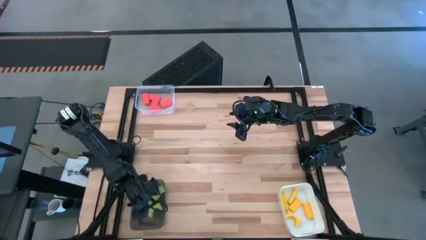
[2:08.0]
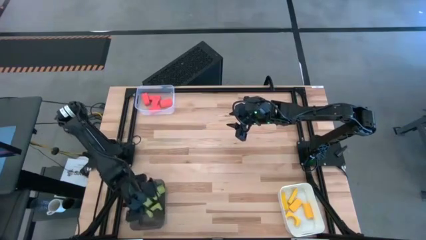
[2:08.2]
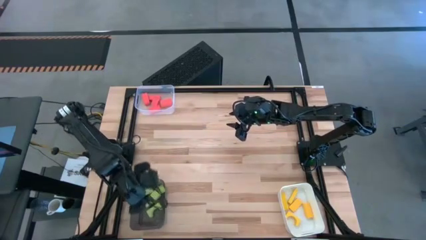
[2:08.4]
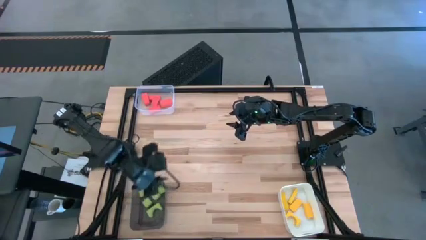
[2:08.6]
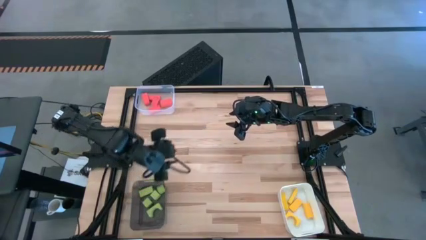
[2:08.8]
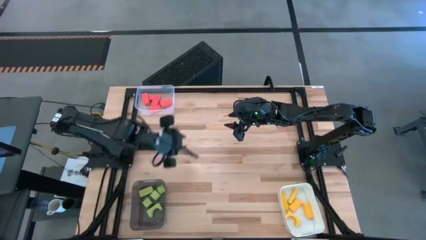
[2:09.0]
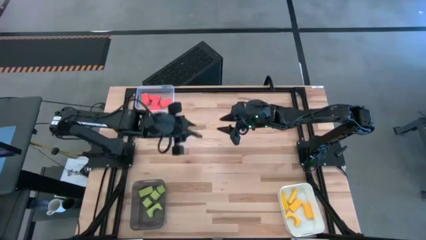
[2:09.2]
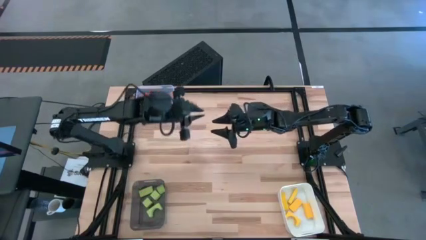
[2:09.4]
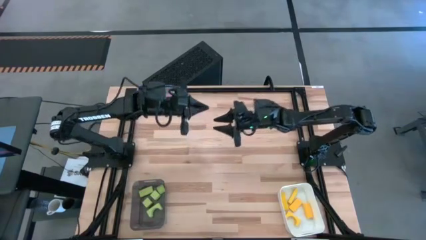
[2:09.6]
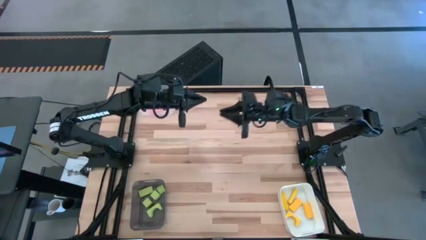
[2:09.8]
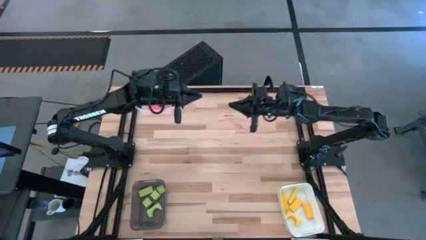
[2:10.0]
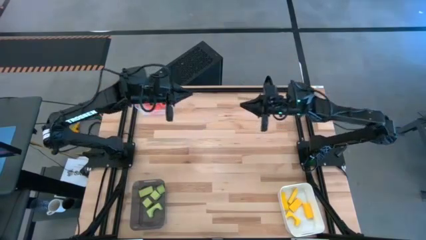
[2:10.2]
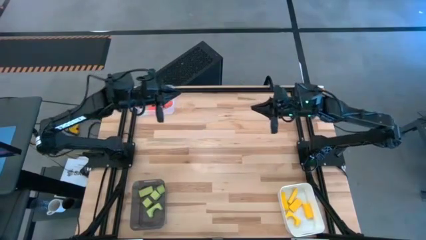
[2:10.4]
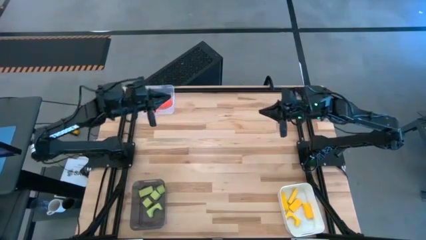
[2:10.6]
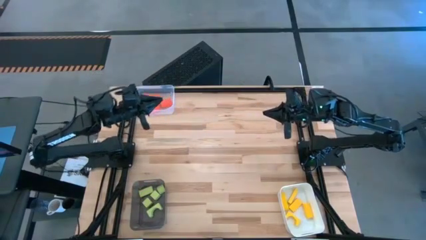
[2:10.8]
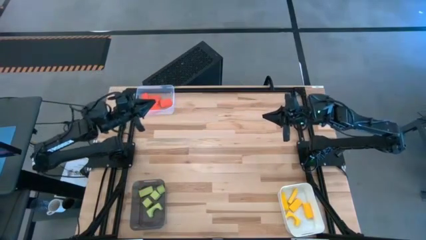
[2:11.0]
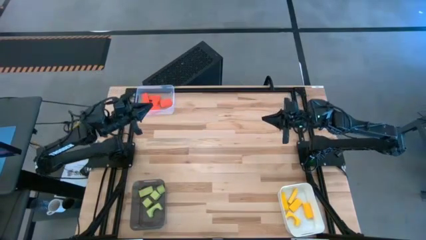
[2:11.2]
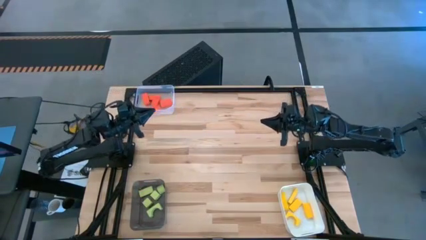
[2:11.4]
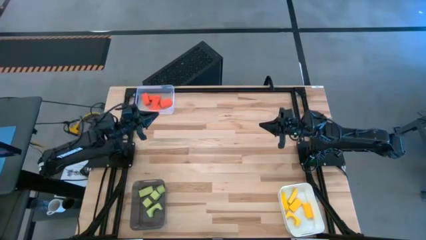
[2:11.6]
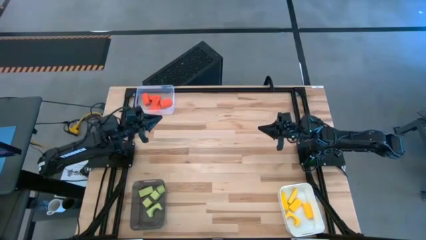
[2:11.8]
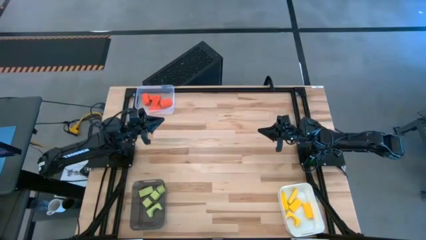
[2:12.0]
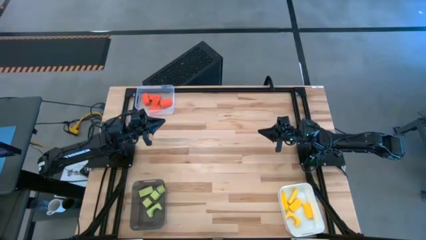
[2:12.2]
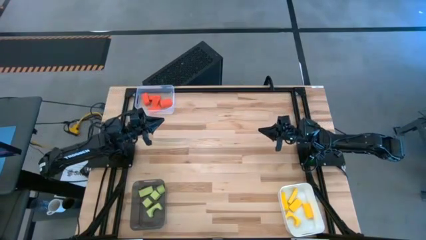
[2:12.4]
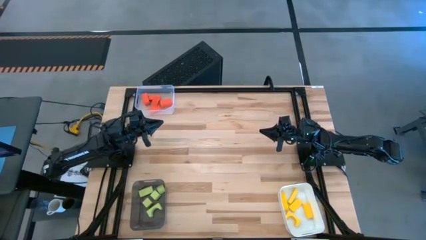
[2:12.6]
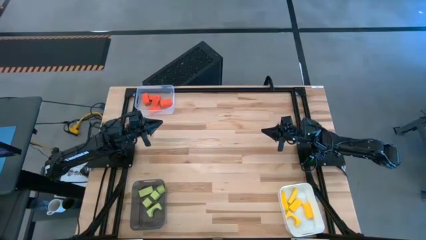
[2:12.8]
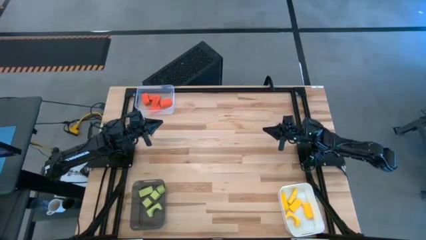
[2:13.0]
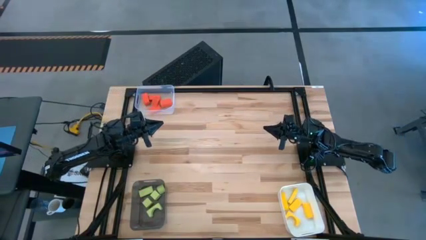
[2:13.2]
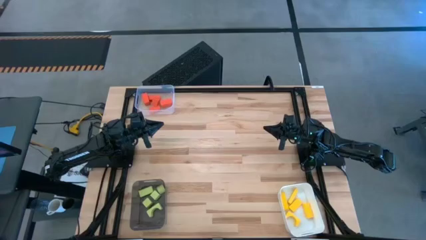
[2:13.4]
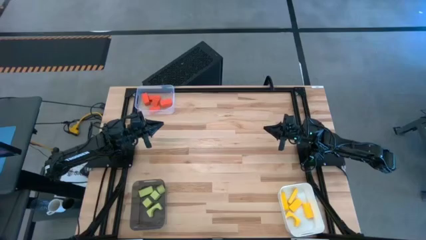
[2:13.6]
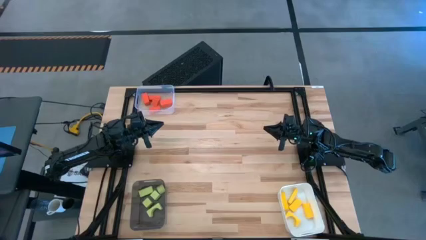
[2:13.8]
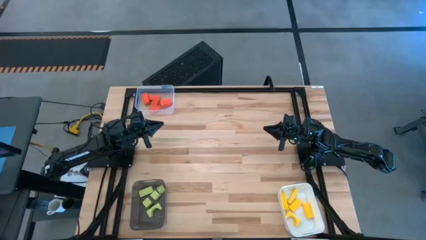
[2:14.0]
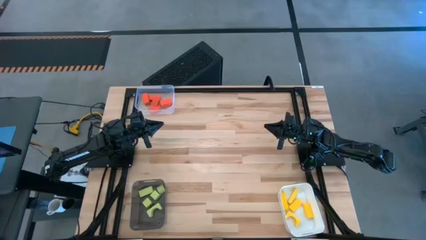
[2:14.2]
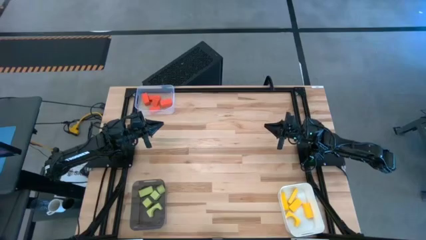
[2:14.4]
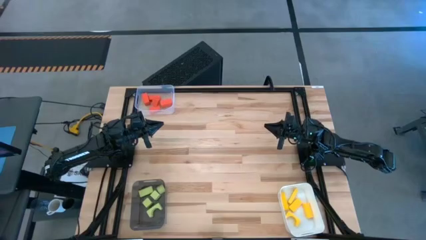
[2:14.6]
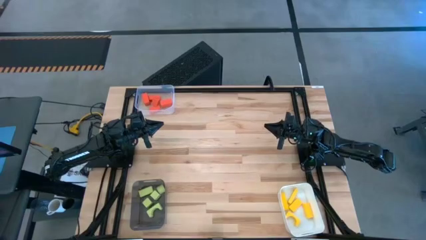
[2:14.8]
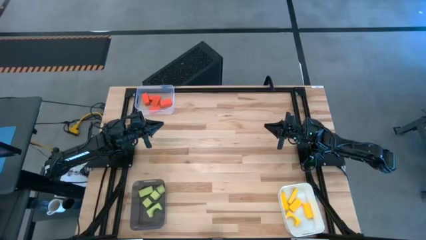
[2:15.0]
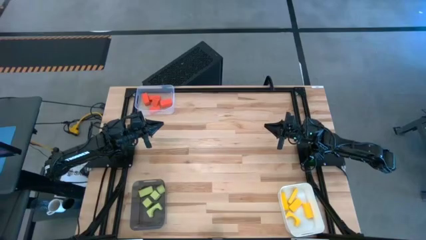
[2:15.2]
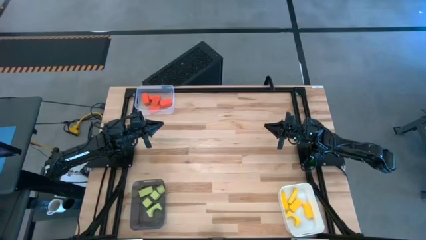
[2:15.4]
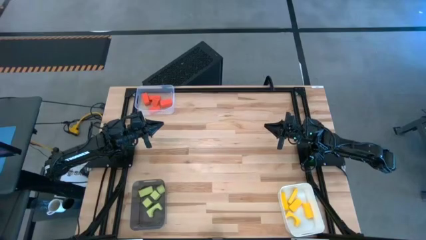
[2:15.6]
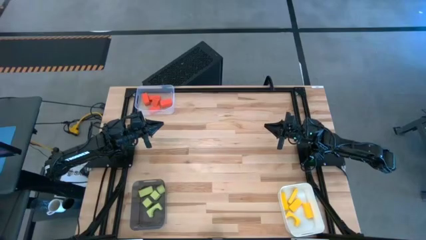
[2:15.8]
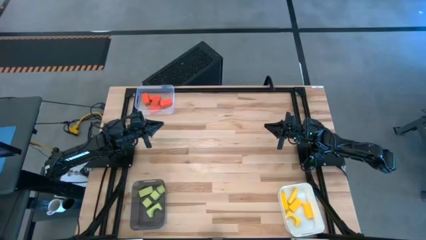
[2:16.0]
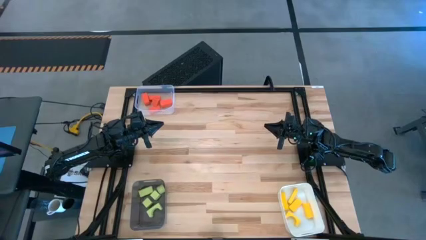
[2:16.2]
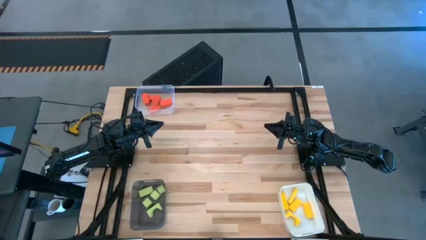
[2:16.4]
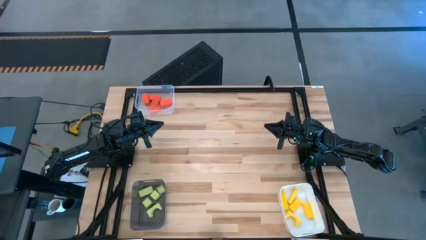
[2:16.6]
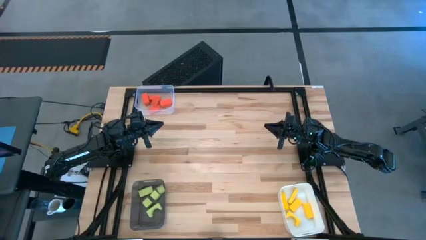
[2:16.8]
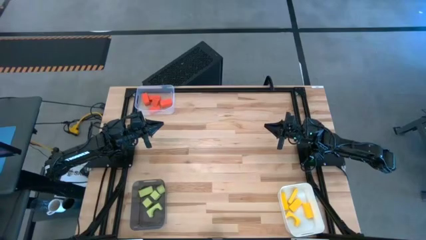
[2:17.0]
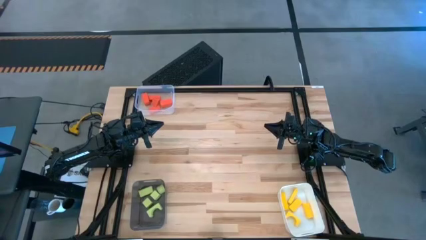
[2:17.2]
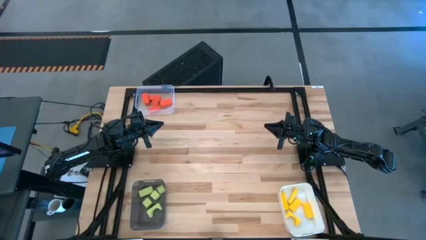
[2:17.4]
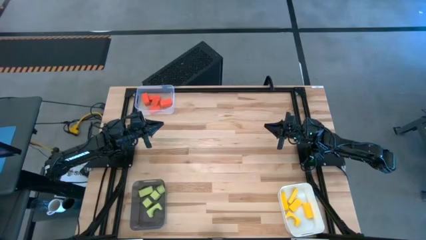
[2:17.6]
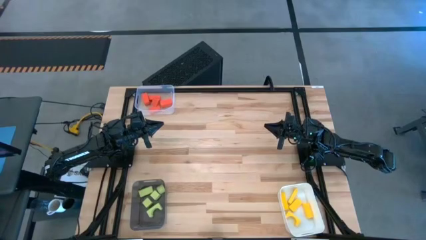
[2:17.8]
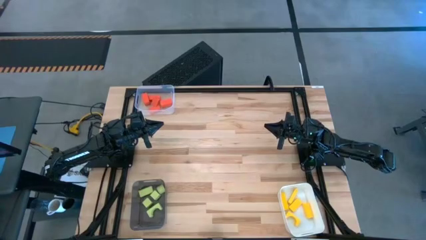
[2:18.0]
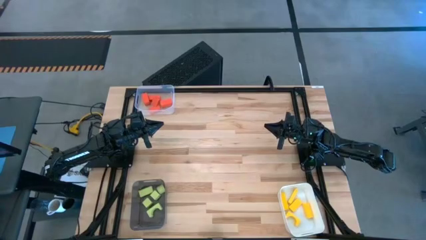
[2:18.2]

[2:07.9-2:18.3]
Task: Sort & place blocks by color
Return to Home Position

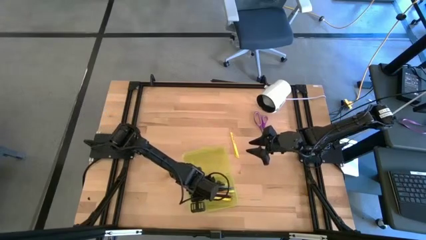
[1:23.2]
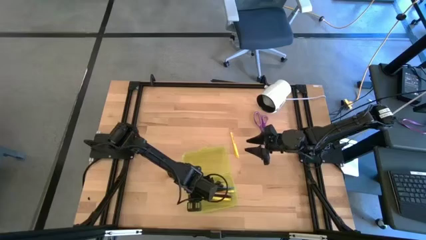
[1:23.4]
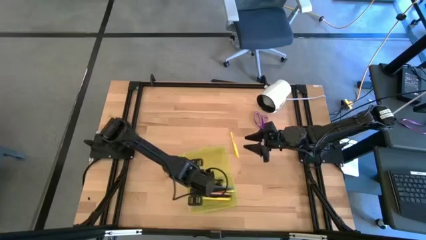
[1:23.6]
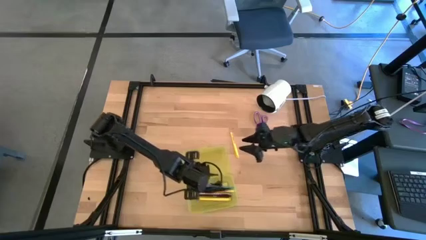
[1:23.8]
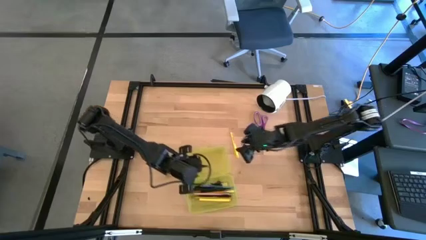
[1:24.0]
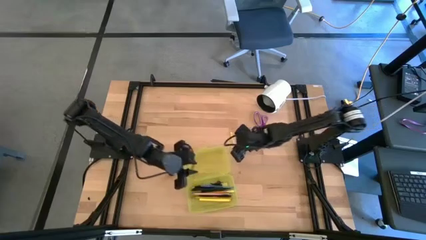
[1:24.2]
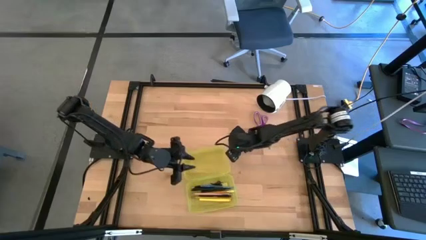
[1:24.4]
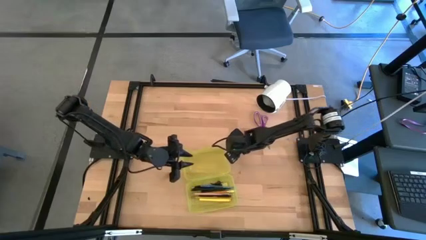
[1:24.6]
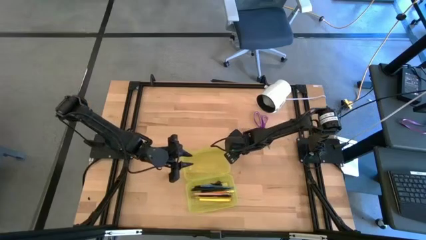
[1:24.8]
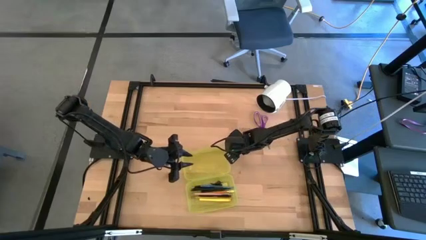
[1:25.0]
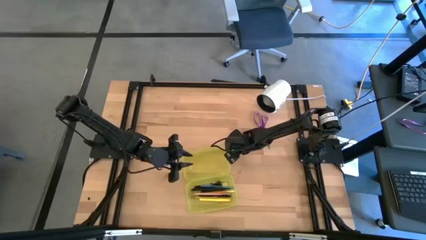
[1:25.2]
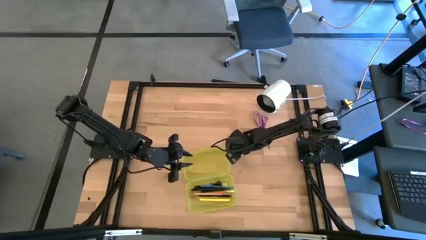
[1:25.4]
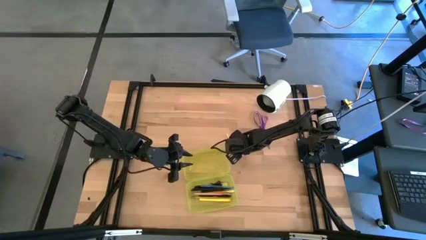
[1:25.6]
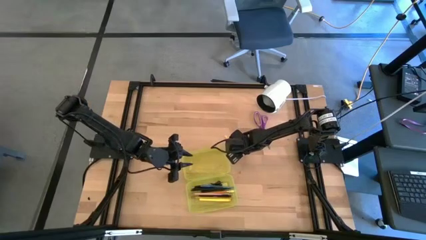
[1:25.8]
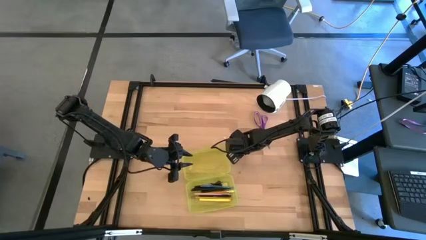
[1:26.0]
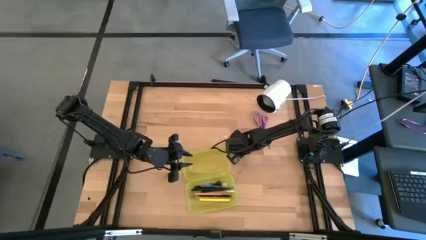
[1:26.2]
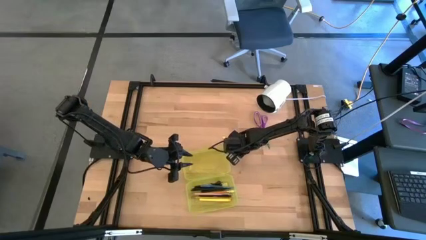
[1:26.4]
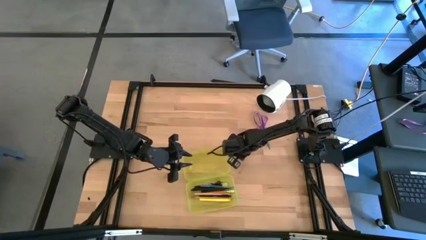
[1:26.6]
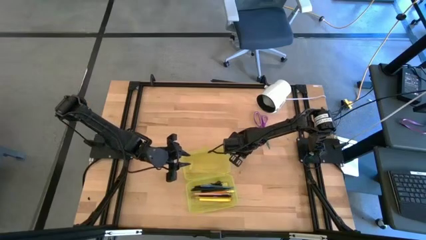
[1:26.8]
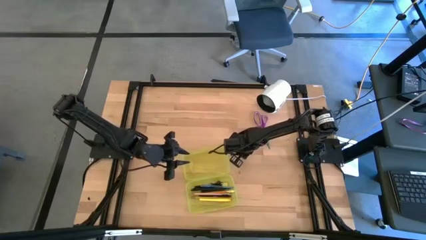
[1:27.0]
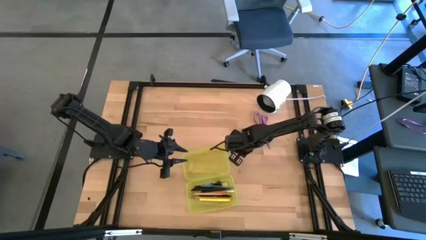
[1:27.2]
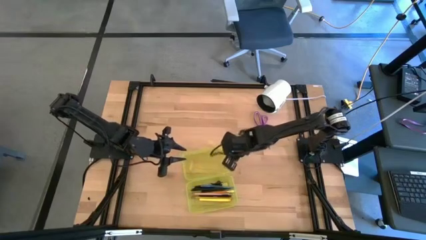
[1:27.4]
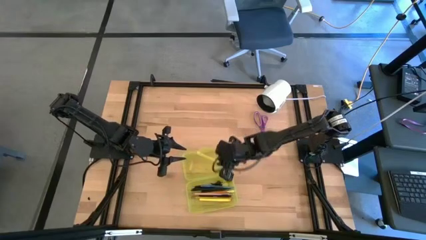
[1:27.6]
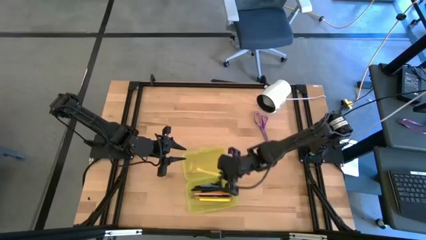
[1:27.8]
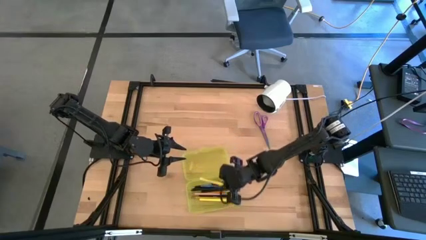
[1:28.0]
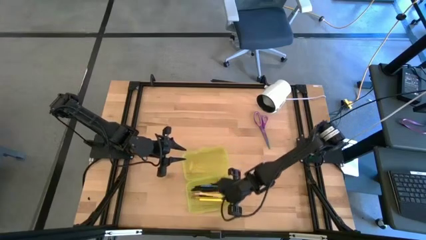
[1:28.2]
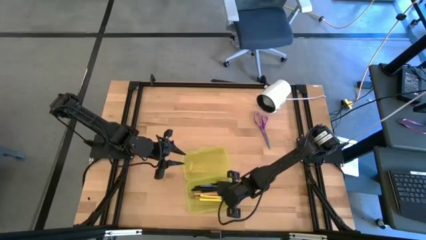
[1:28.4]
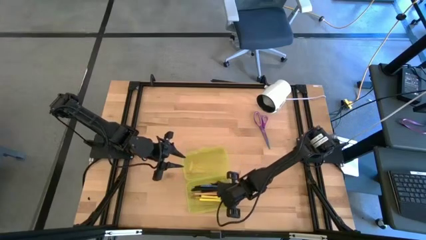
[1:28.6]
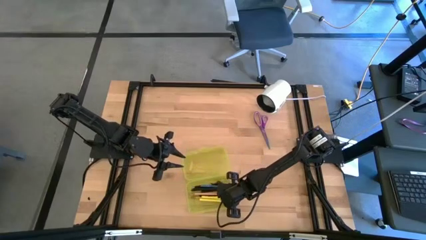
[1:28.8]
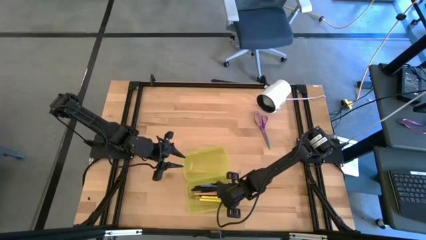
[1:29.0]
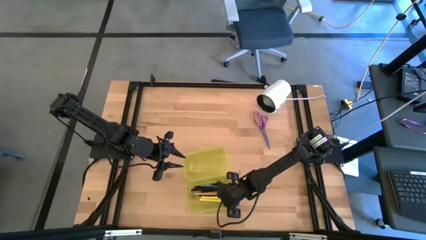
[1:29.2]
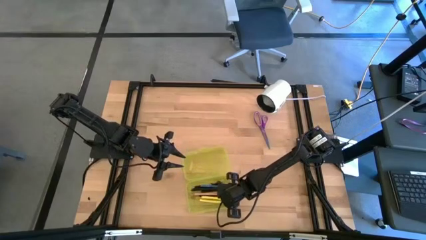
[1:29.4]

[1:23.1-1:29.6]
Task: Pick & place school supplies into a supply box
Put the yellow pen into the yellow supplies box
